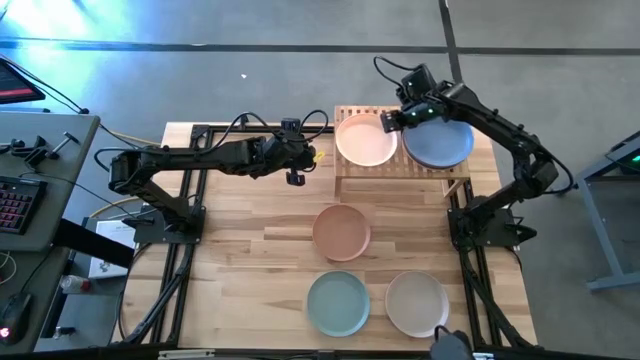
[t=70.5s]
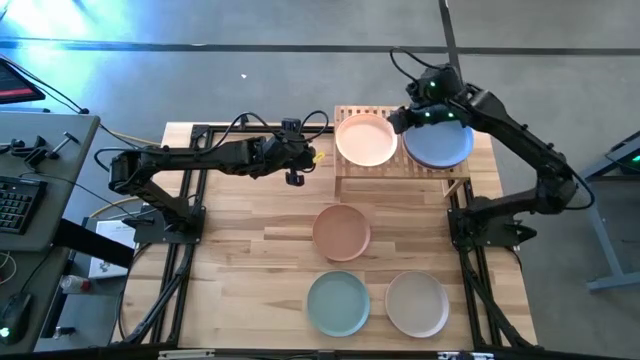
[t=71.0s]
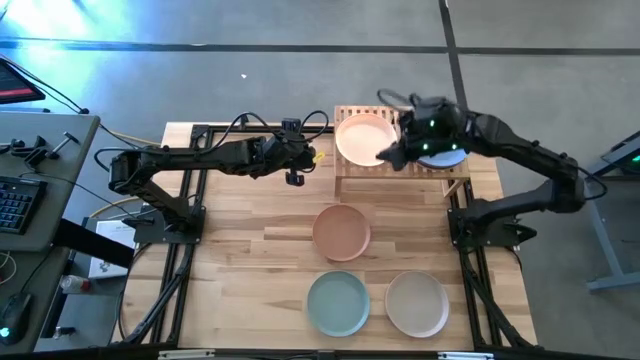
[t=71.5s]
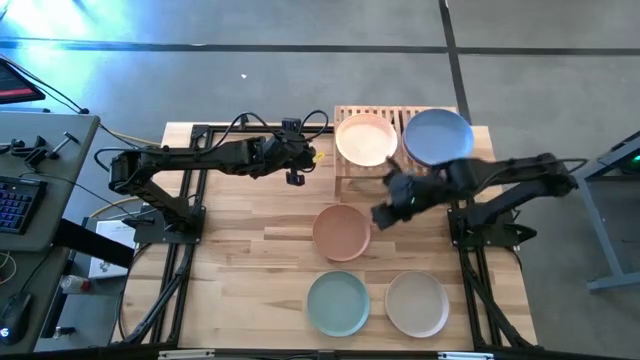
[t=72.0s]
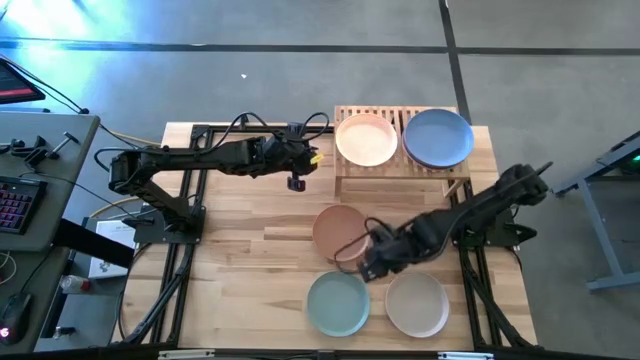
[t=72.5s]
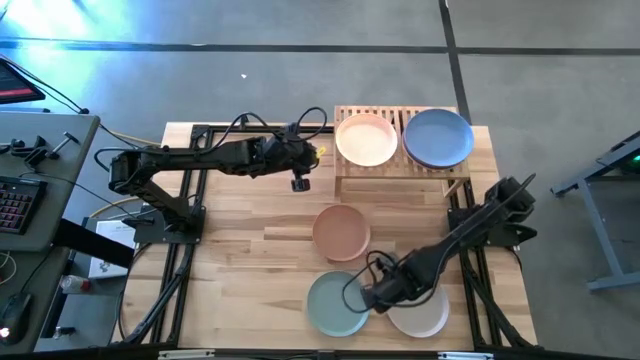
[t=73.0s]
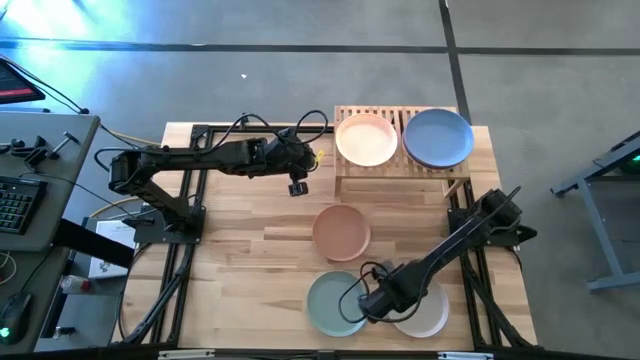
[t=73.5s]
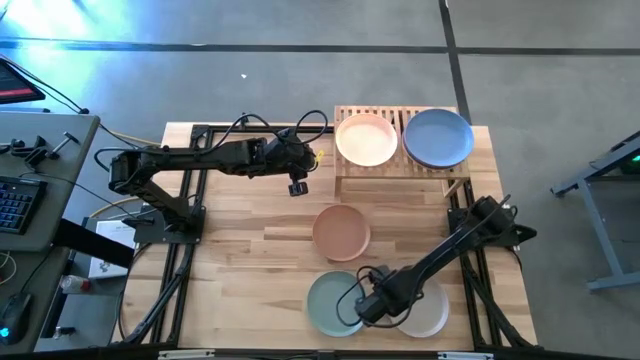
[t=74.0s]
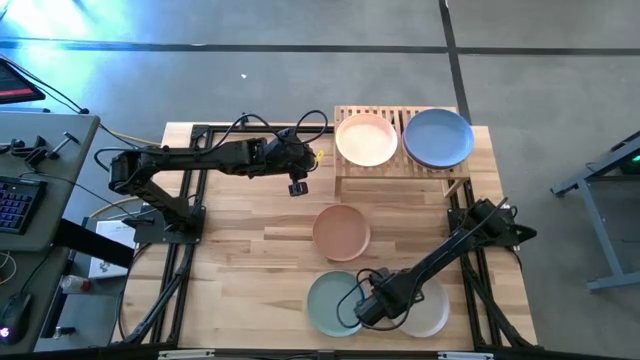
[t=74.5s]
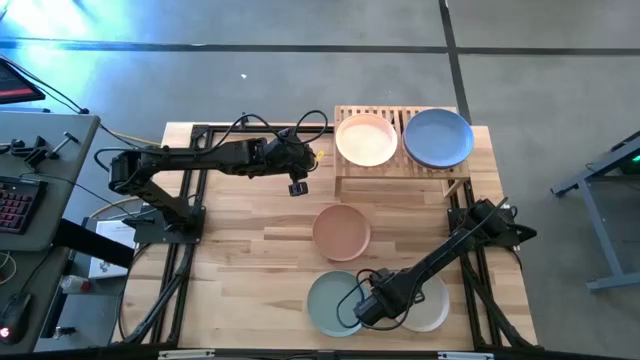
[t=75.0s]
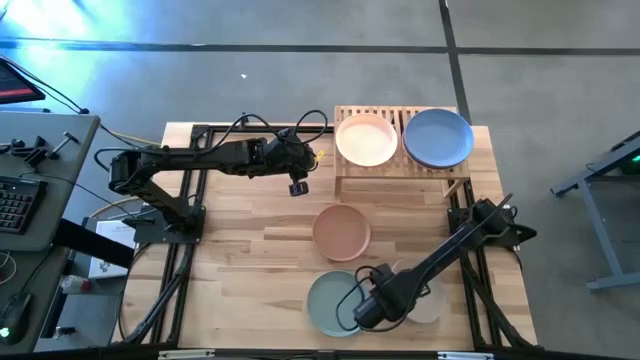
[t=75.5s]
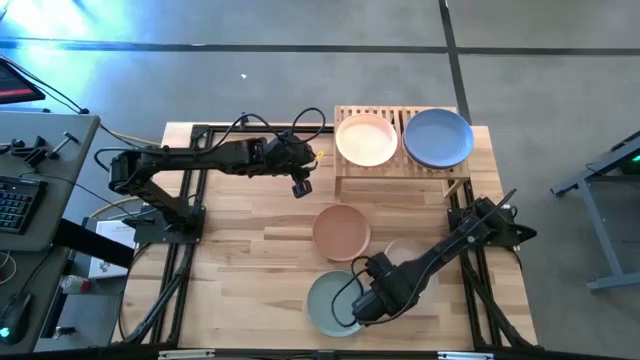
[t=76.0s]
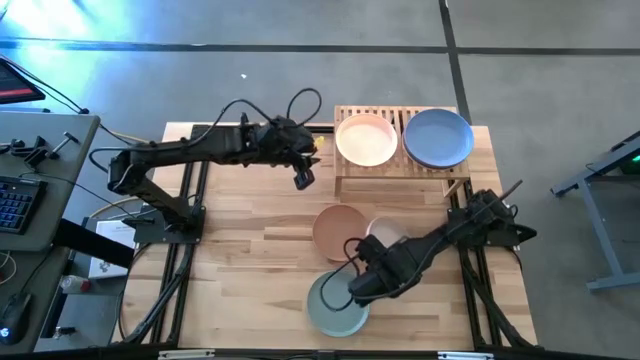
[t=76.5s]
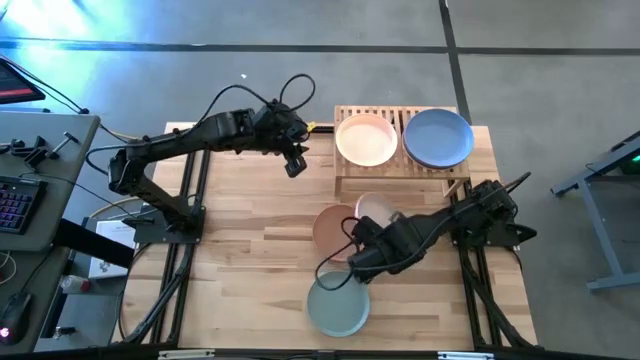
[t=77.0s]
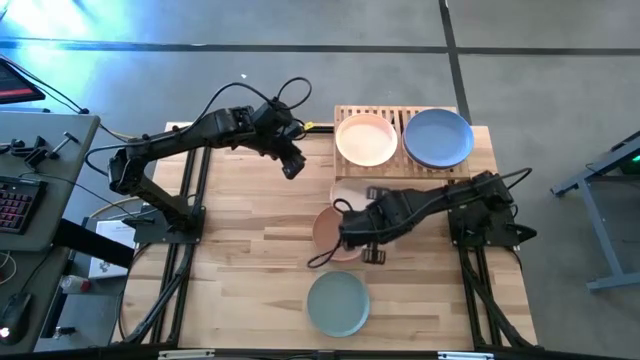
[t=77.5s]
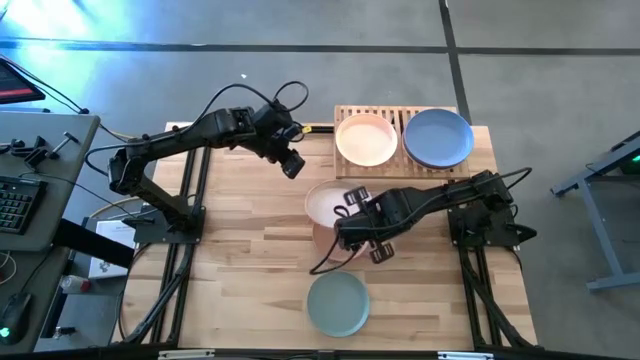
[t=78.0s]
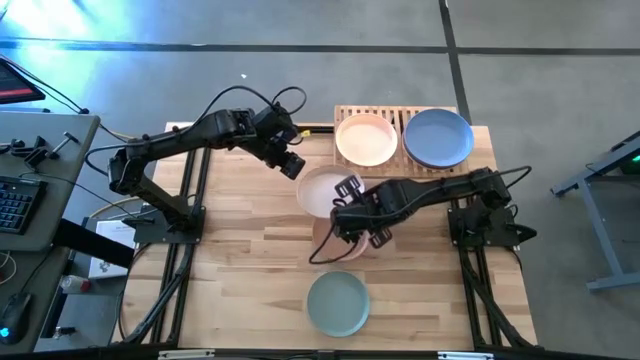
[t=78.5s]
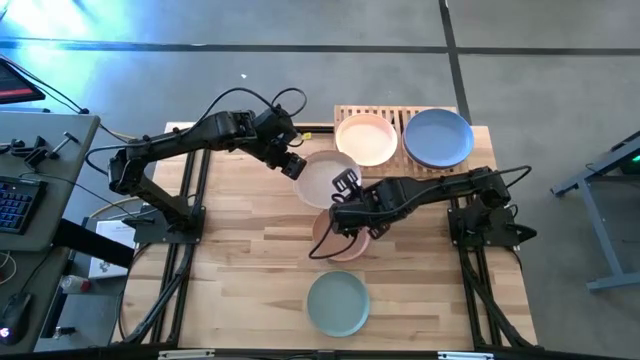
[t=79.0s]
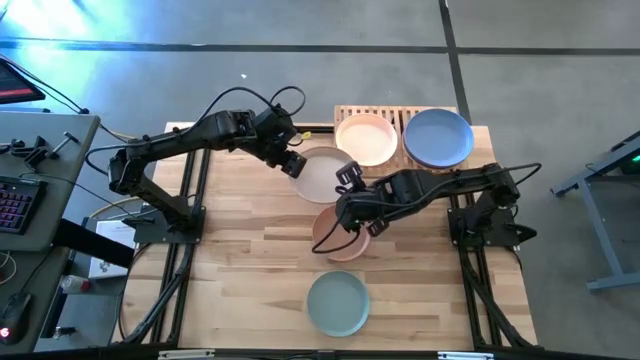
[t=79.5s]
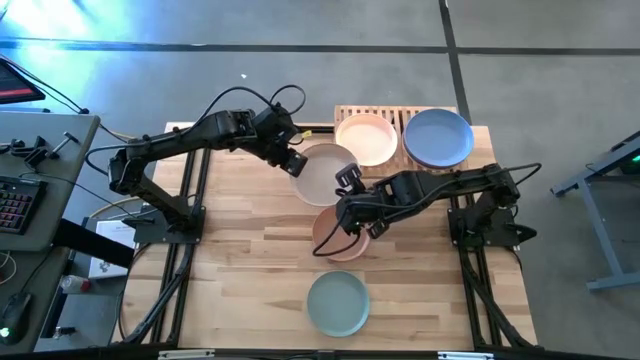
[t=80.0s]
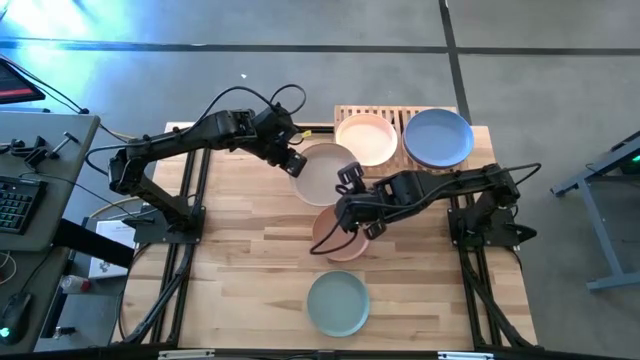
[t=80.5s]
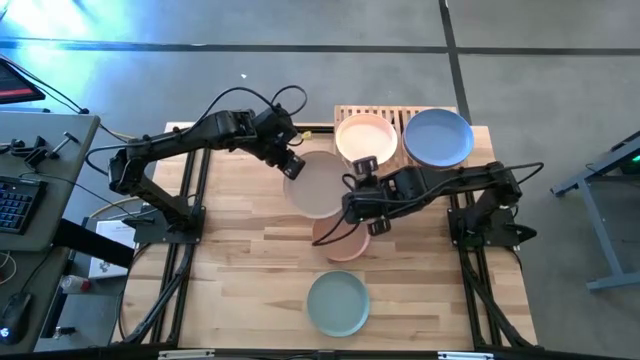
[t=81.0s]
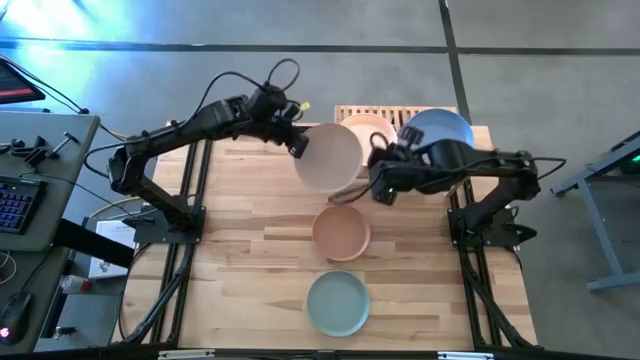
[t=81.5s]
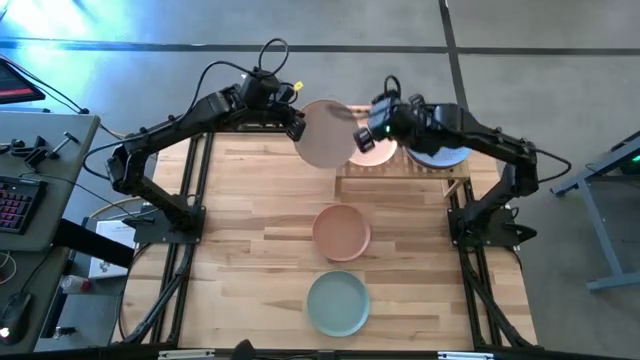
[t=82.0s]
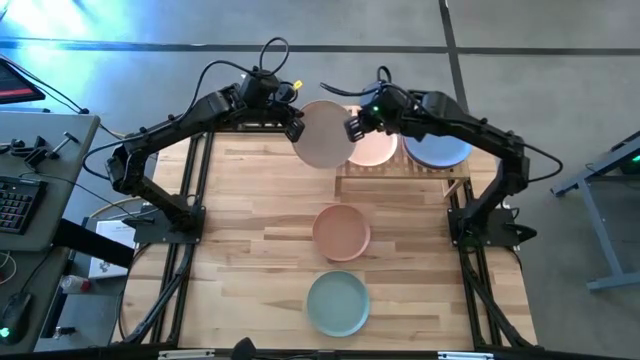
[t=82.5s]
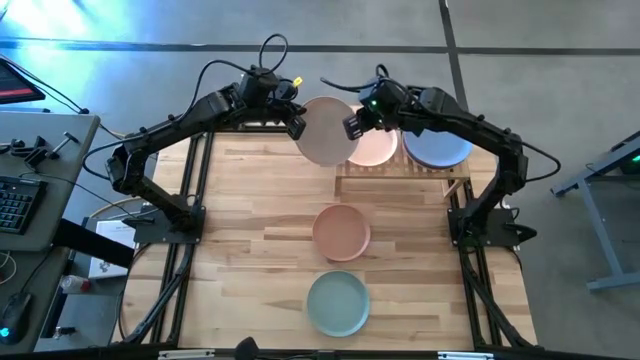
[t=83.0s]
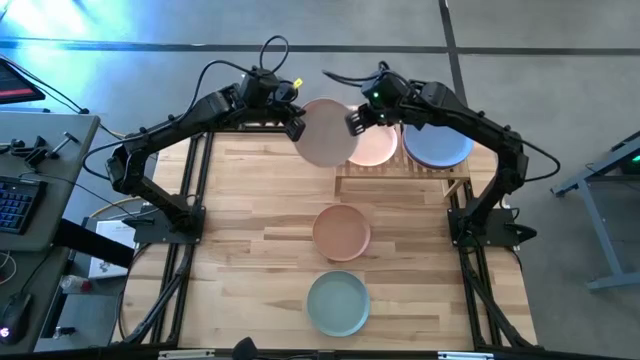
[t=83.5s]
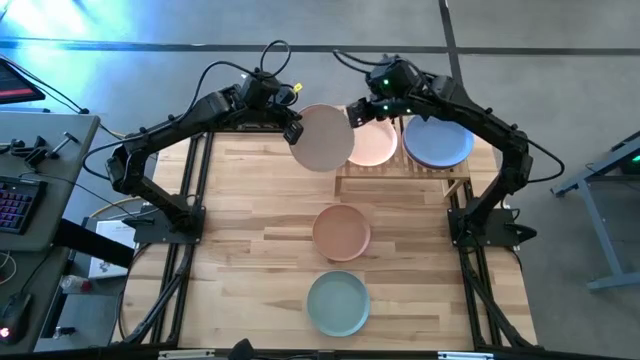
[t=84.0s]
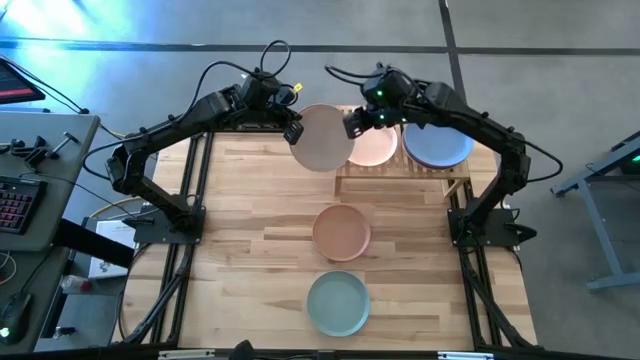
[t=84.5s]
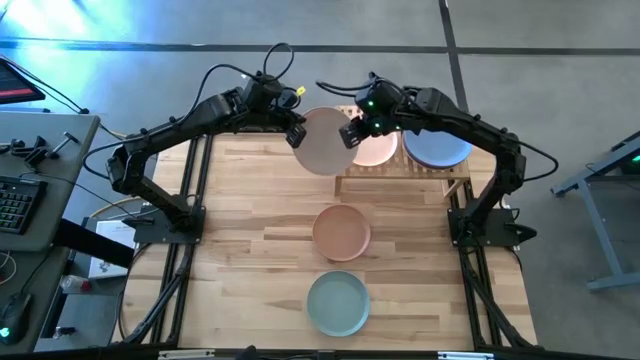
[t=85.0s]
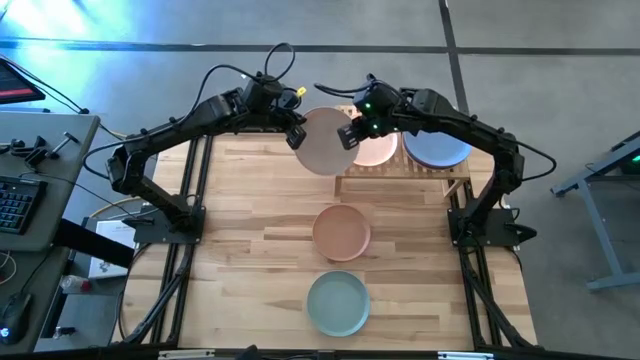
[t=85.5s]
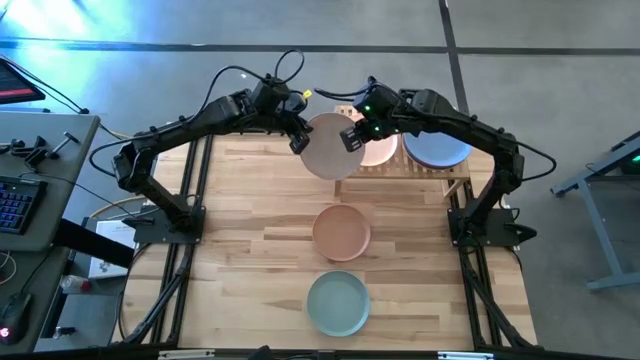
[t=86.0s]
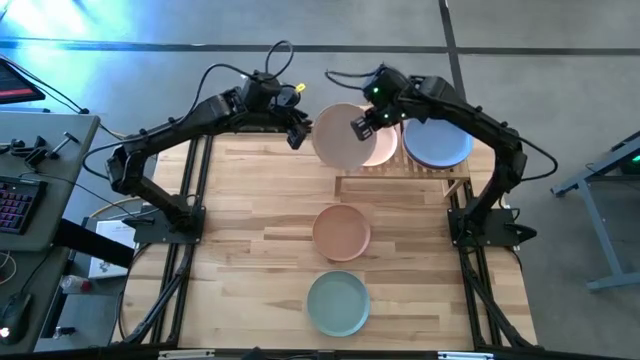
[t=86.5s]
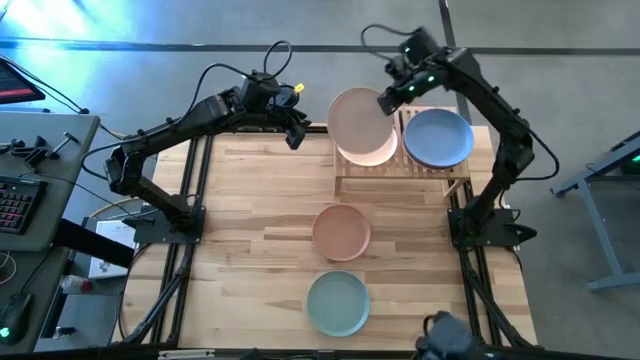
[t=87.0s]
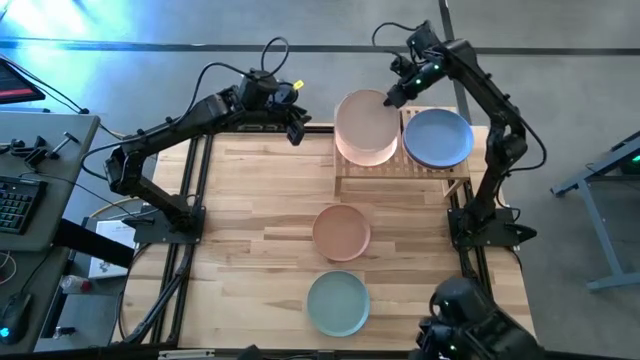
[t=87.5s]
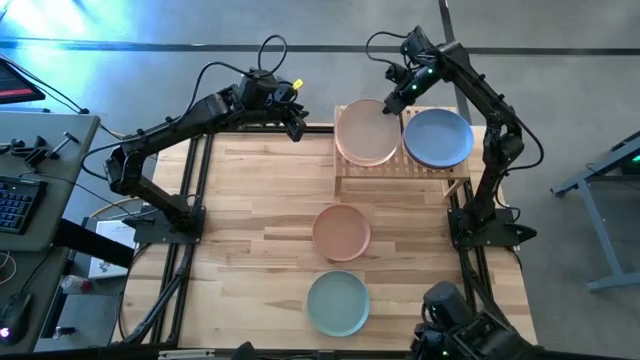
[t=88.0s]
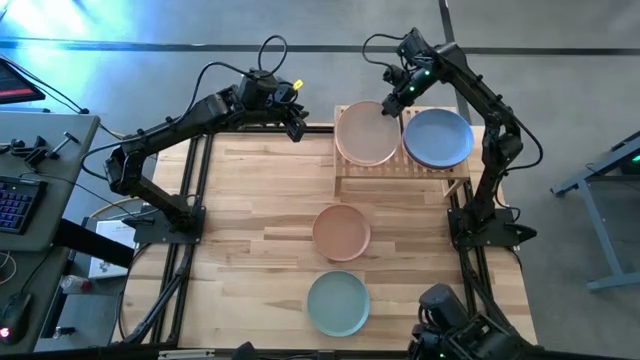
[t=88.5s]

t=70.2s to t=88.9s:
Task: Place and stack plates onto a shelf
Stack the white plate on top of the light orange plate on the shelf

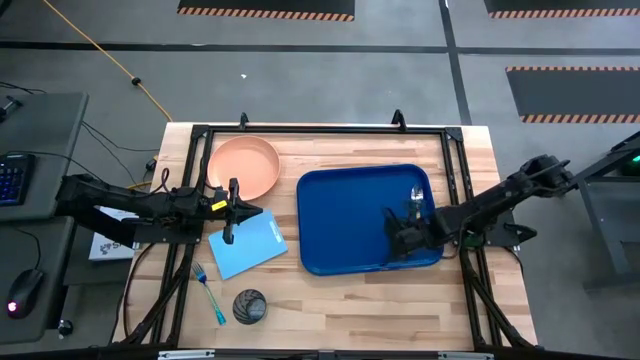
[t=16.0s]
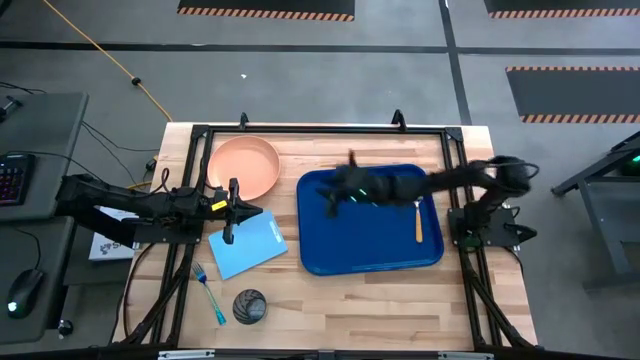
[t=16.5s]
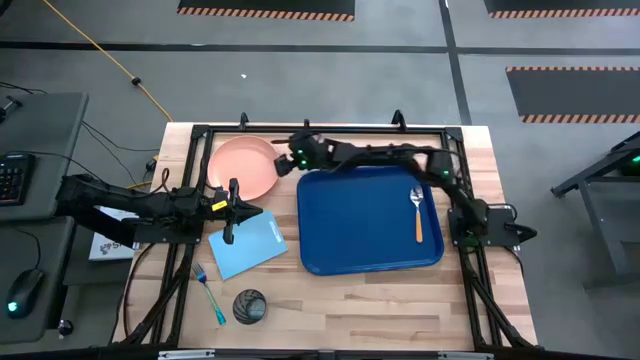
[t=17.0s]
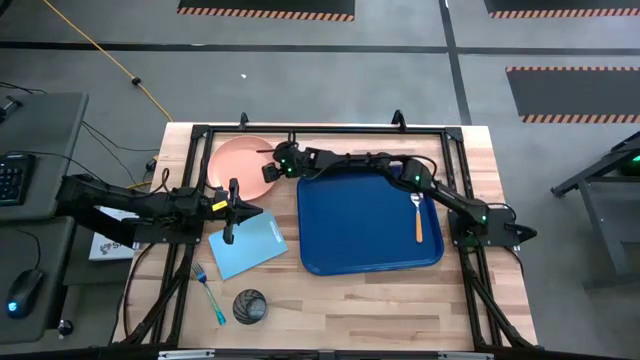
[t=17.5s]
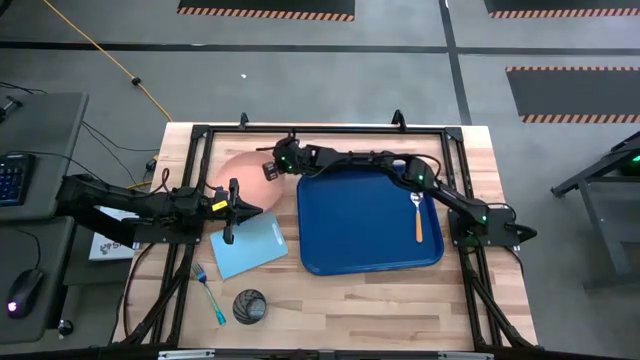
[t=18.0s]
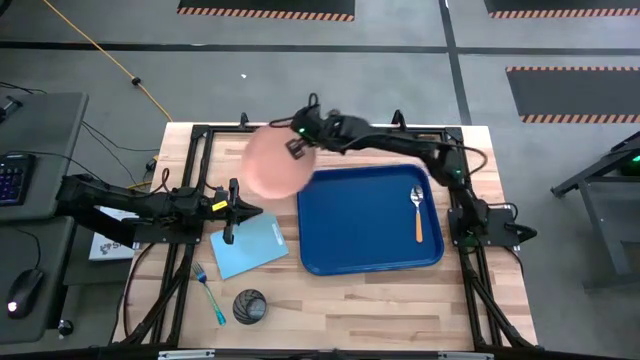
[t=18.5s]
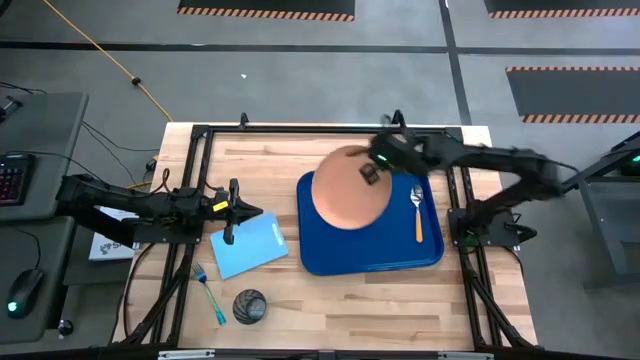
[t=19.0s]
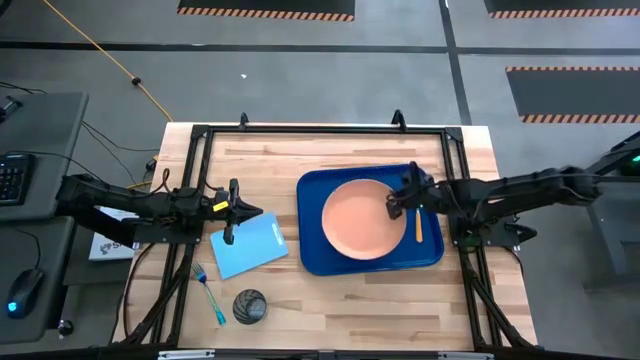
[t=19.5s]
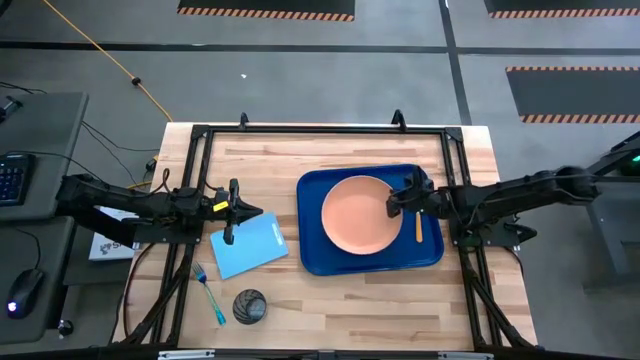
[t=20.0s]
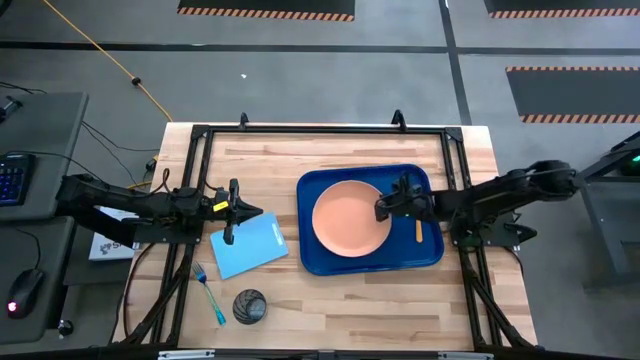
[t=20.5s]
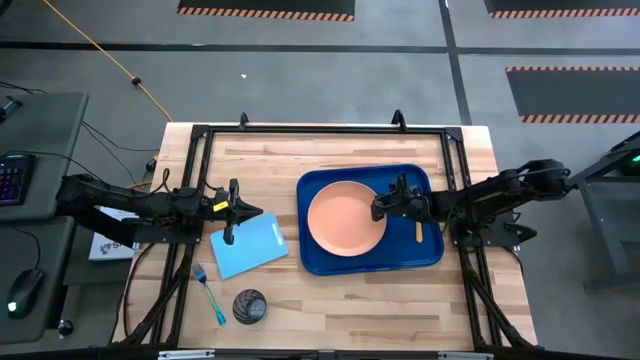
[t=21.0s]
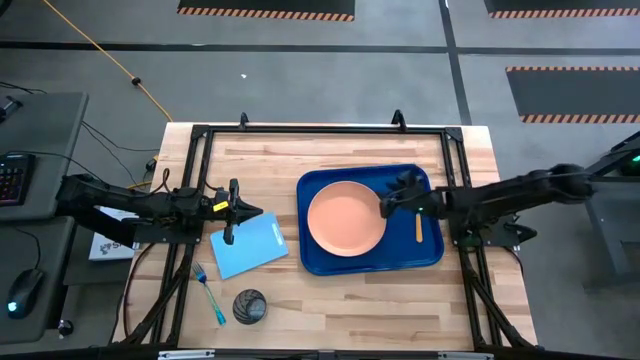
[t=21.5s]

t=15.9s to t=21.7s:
Task: Pick and place plate/cup/fork/spoon on tray
Put the pink plate on the blue serving tray to the left of the orange spoon
